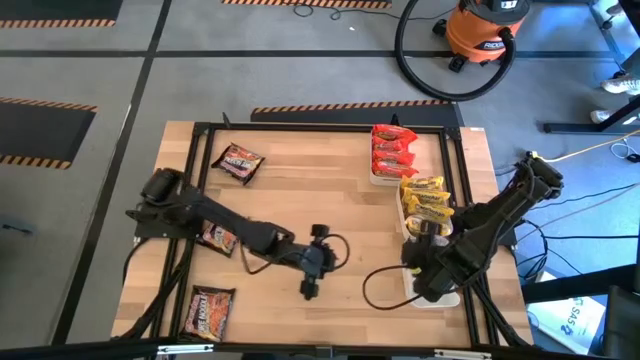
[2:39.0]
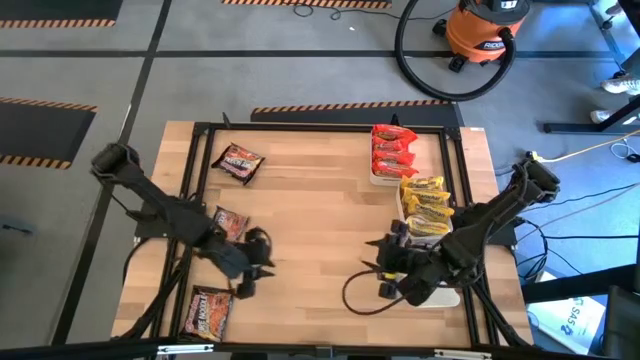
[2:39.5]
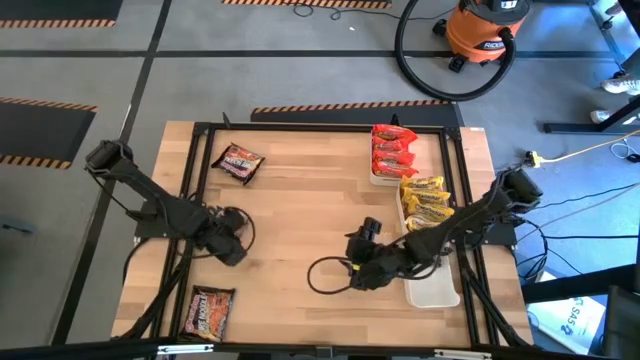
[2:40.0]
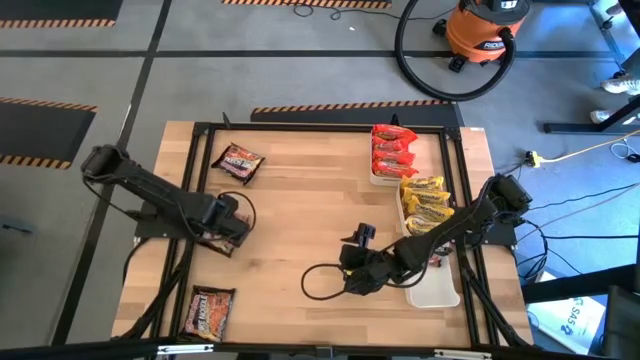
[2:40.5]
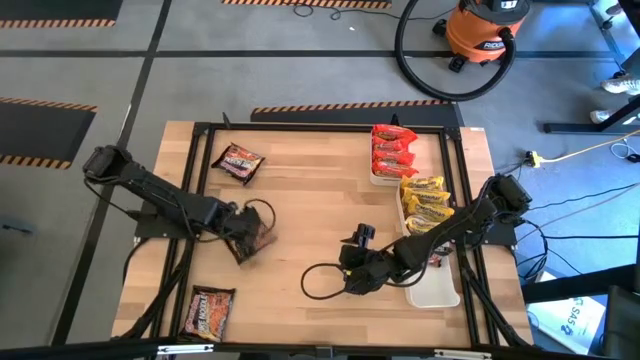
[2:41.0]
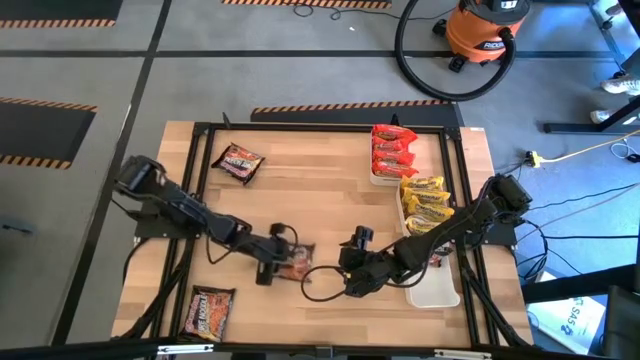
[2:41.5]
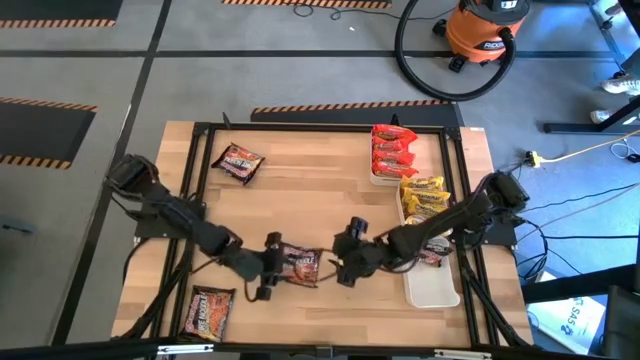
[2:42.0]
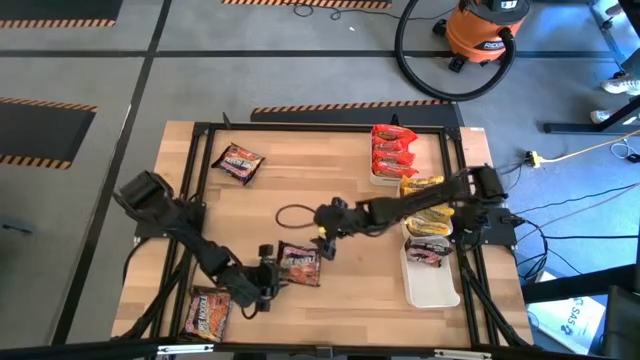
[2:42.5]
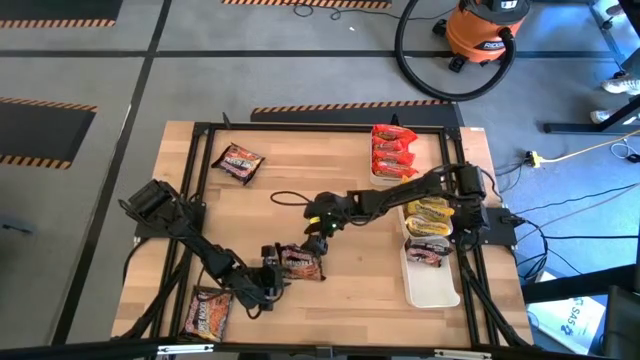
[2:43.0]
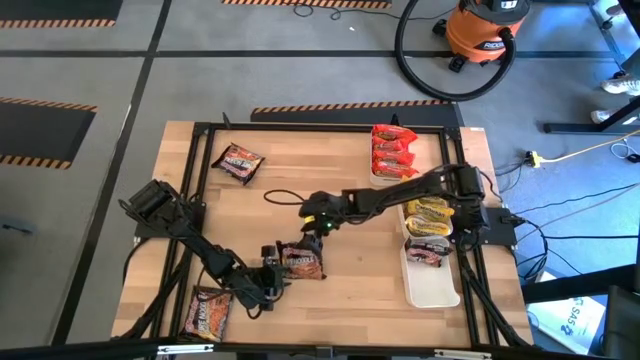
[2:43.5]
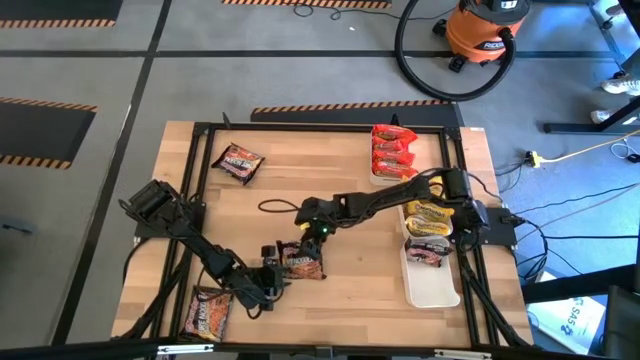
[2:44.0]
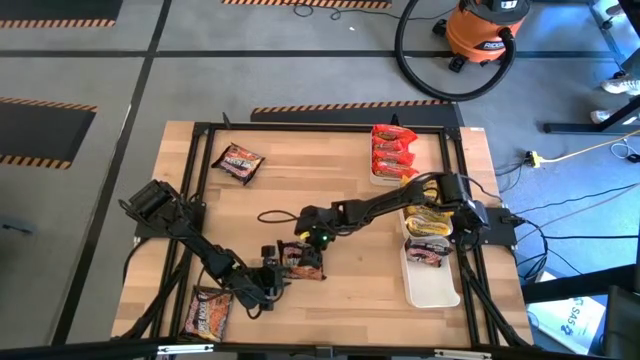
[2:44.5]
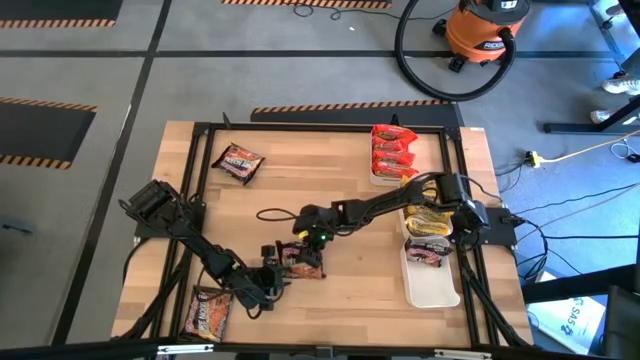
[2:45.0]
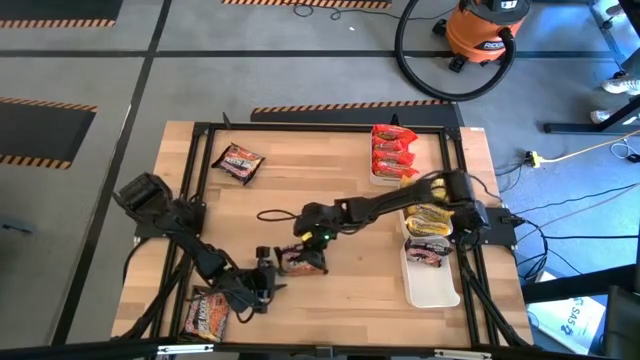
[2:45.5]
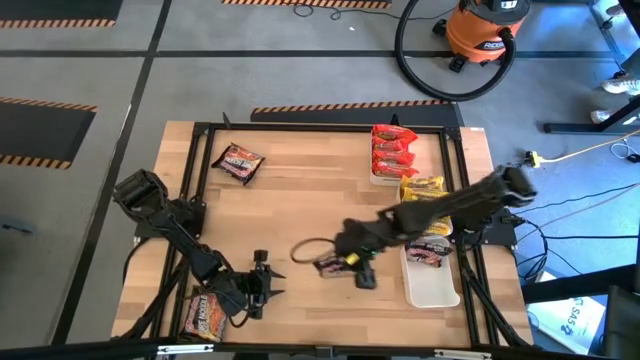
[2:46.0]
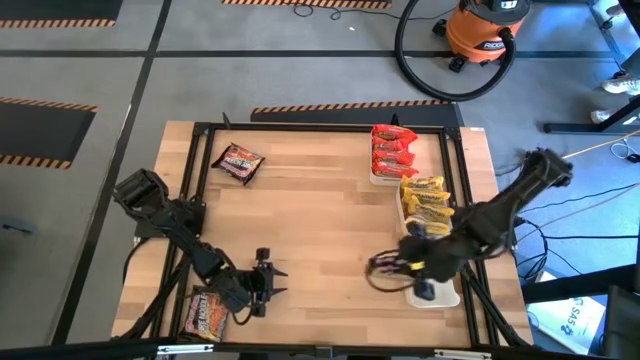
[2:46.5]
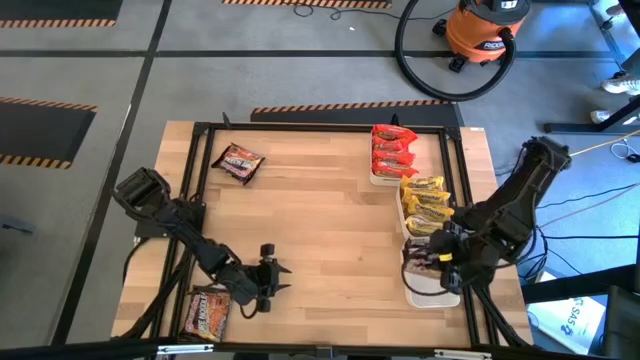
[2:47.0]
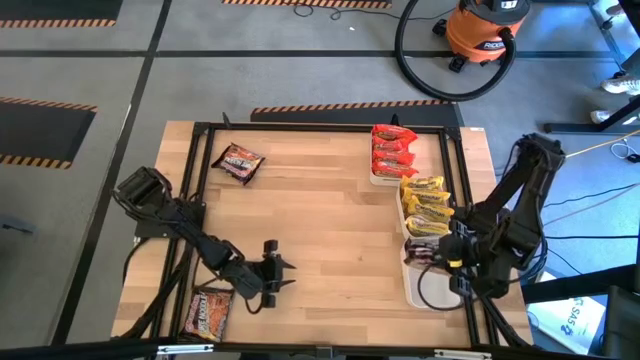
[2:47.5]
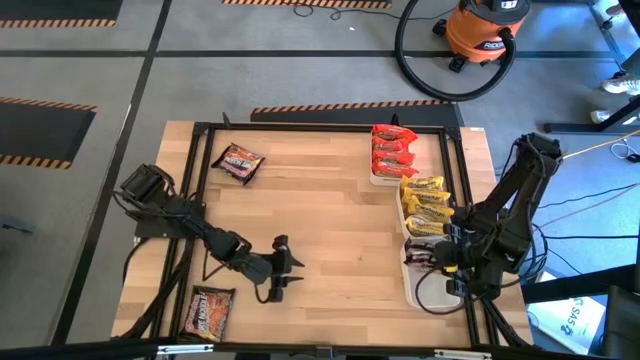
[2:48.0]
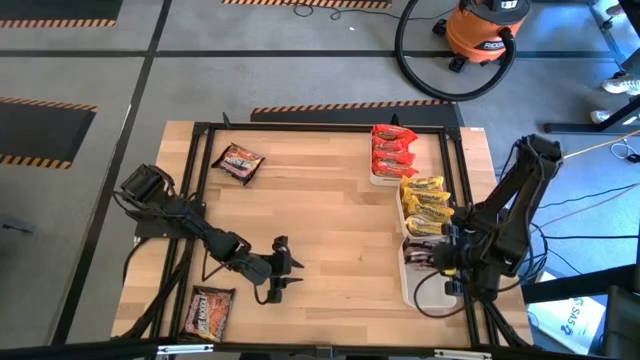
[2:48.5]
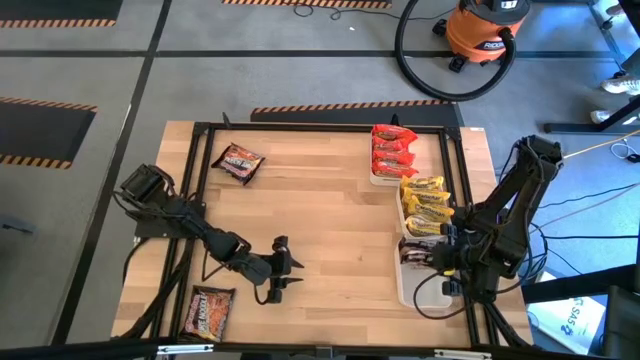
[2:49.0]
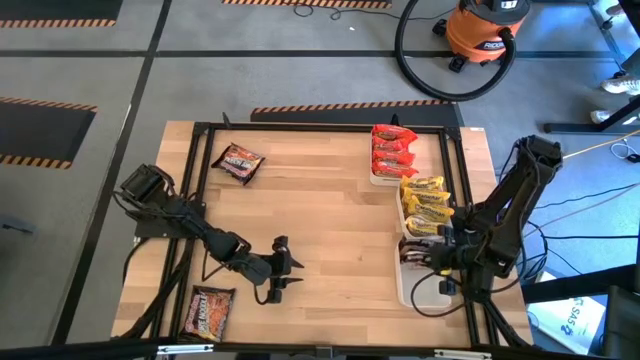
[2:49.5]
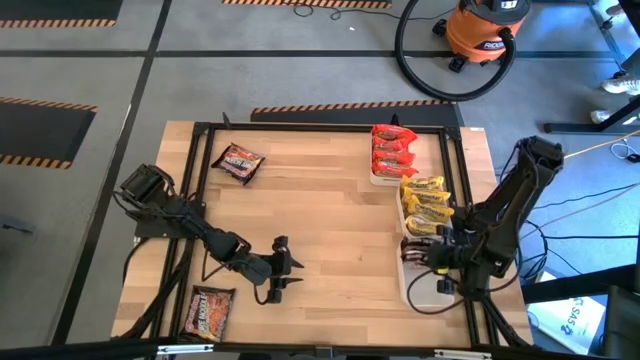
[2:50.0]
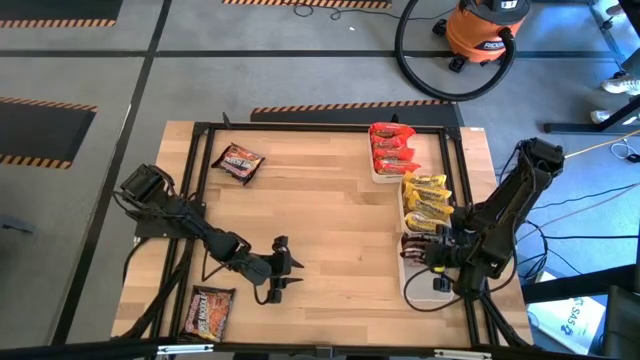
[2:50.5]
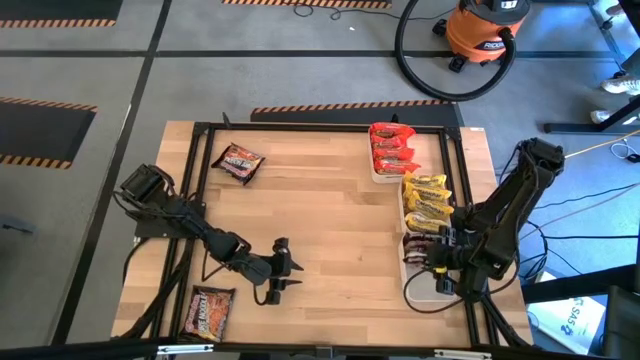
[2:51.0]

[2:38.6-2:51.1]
Task: Sort Maruchan noodles
Put the black noodle pack into the bottom white bin

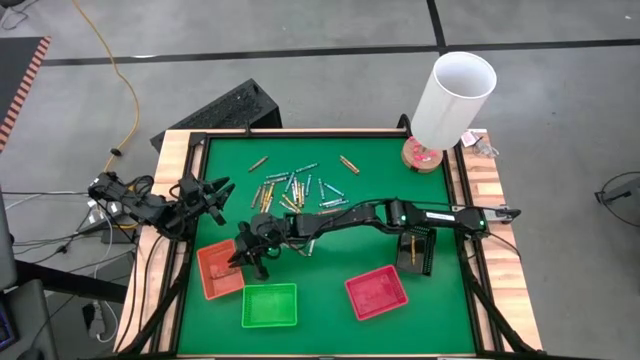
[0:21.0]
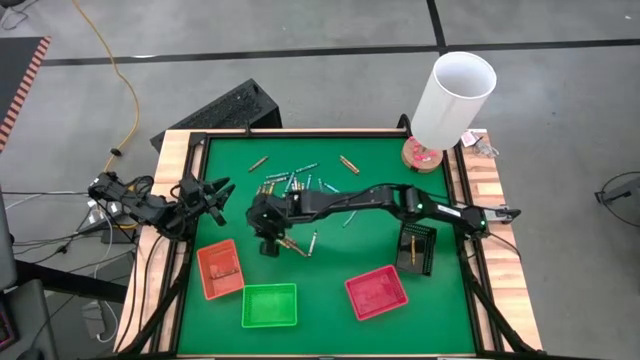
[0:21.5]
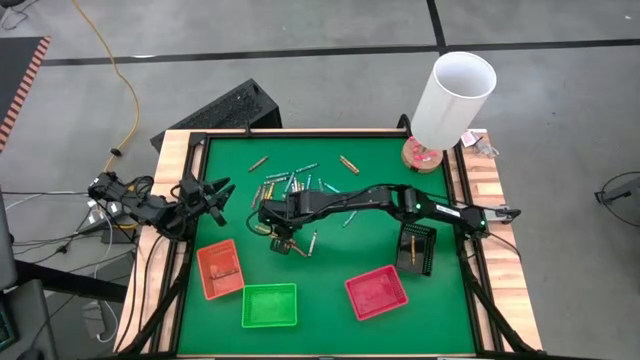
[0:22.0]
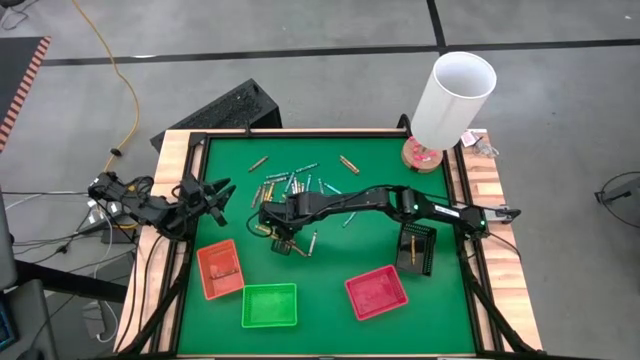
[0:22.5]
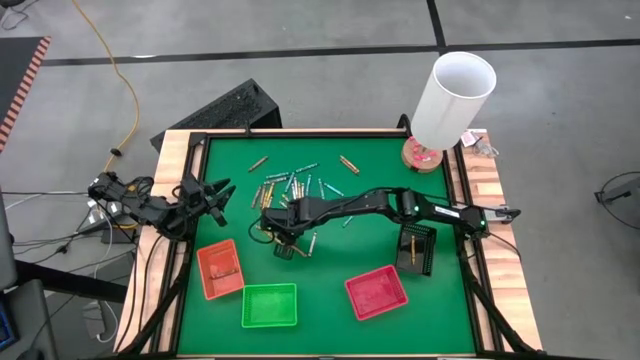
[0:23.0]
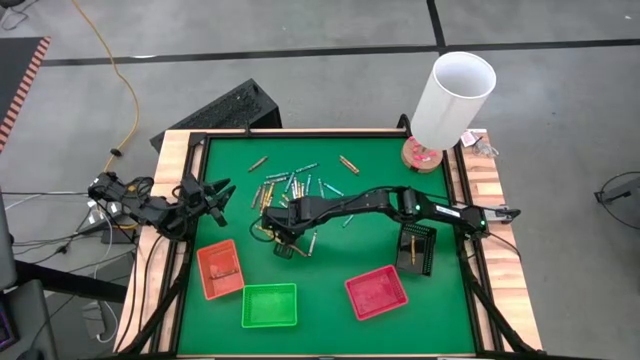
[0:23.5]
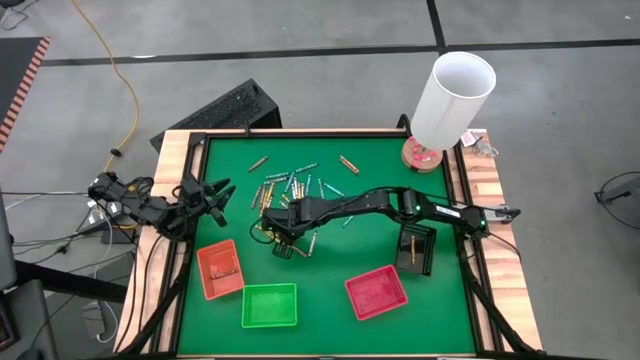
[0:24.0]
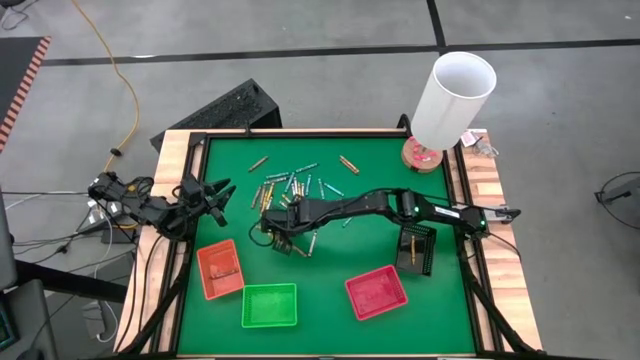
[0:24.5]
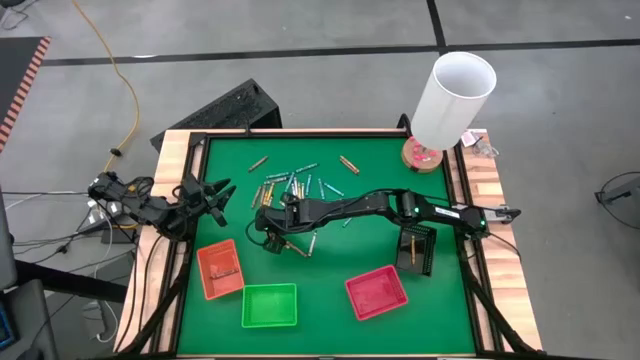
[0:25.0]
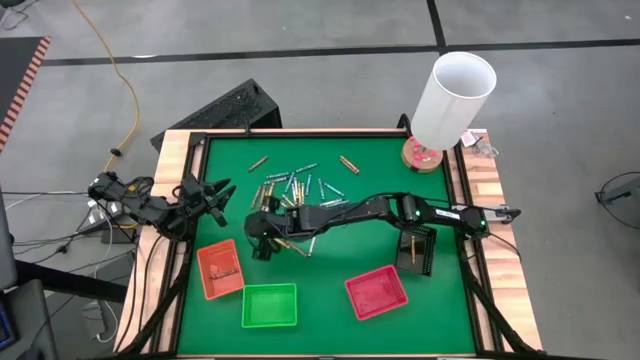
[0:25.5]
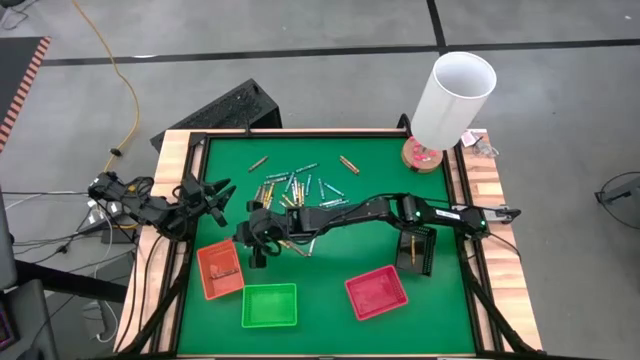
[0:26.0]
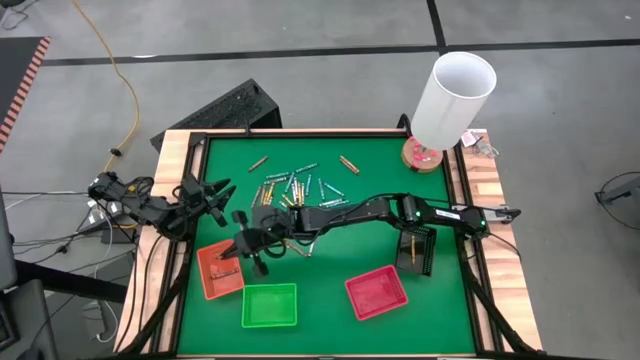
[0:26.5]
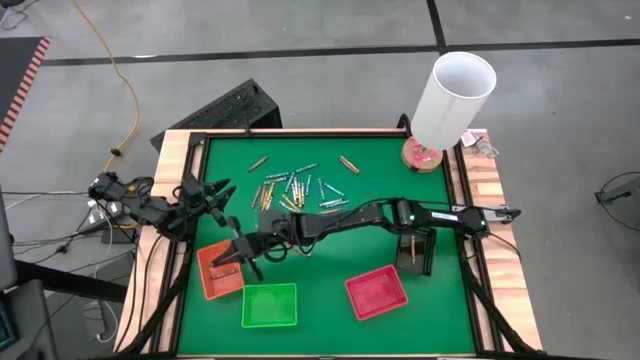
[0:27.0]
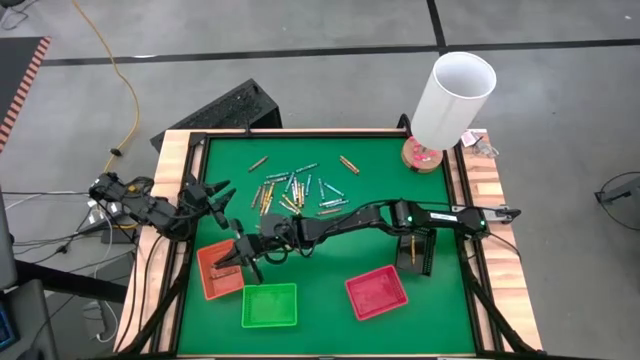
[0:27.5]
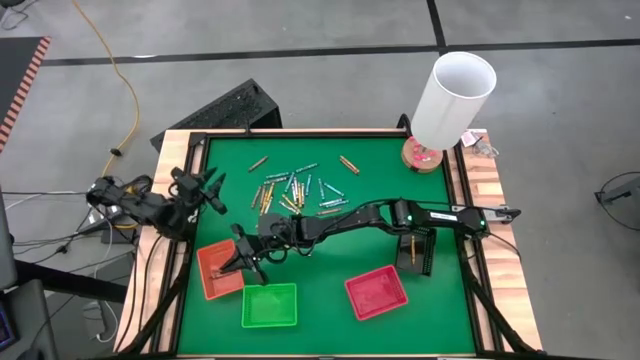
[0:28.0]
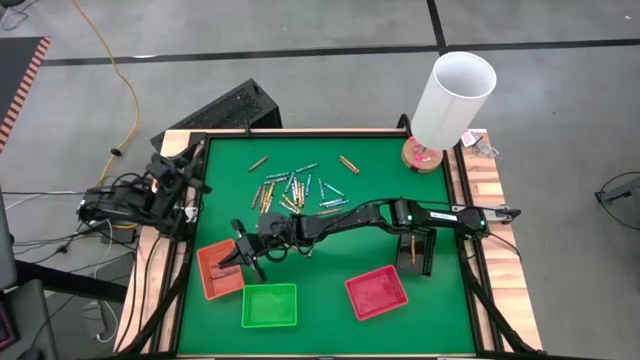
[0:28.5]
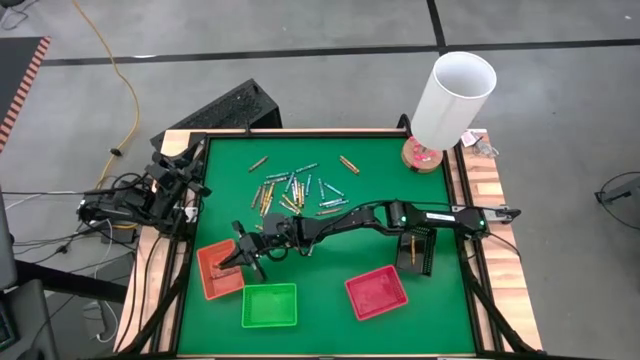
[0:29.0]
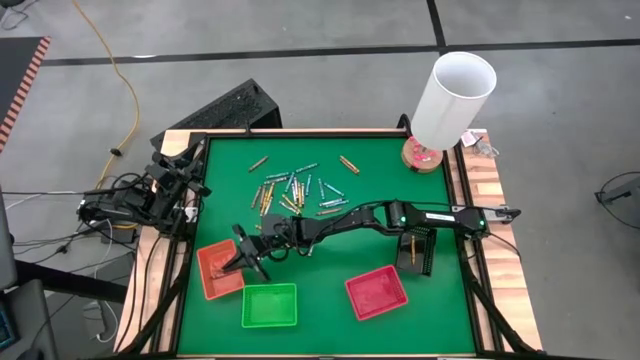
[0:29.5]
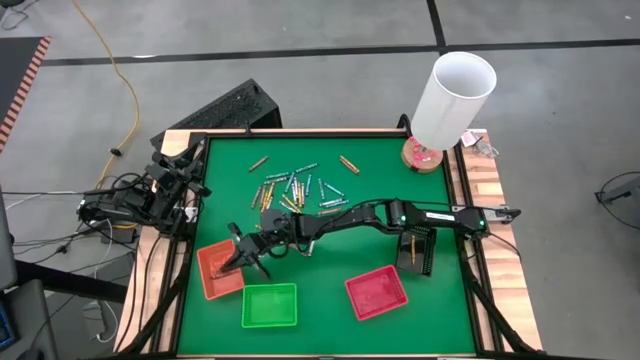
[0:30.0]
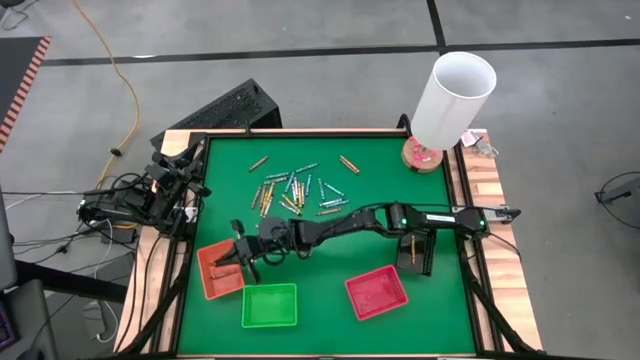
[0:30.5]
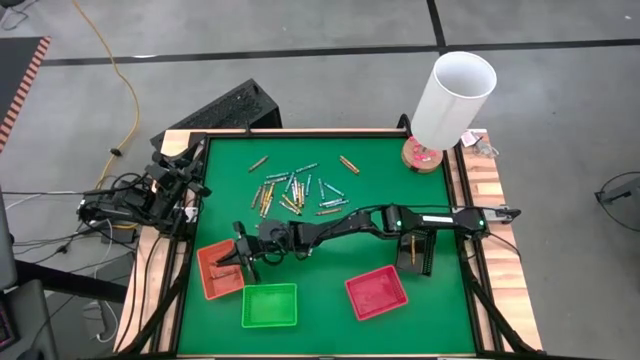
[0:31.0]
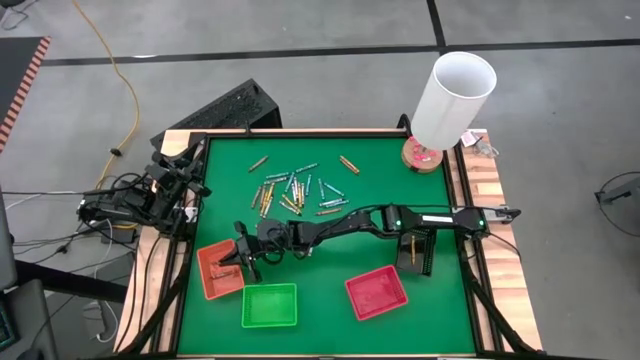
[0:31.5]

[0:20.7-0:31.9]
Task: Sort crayons
Put the brown crayon into the orange bin
